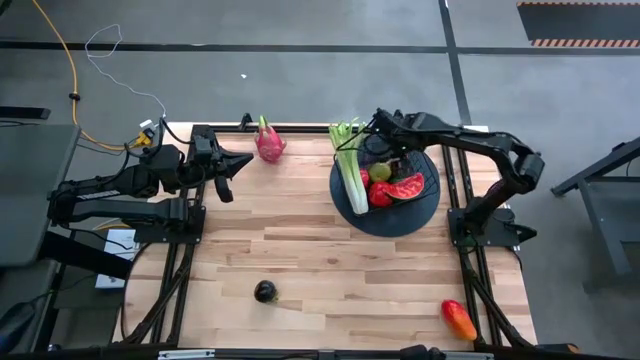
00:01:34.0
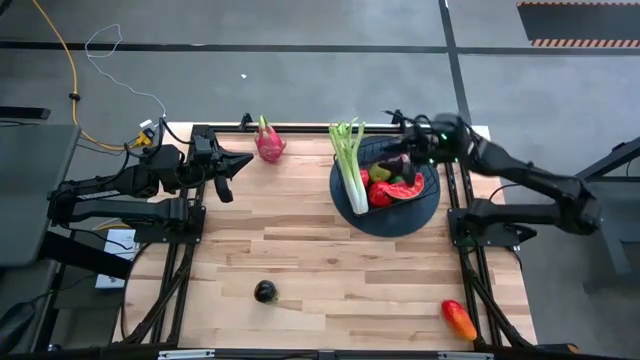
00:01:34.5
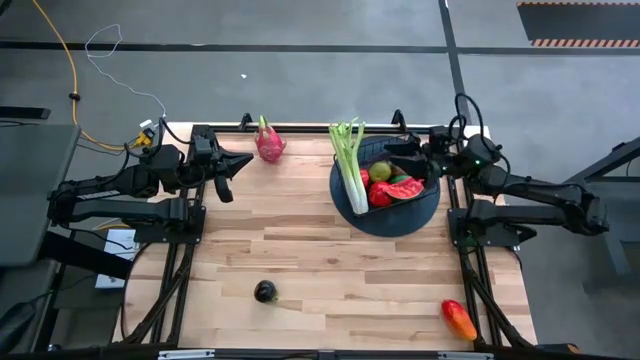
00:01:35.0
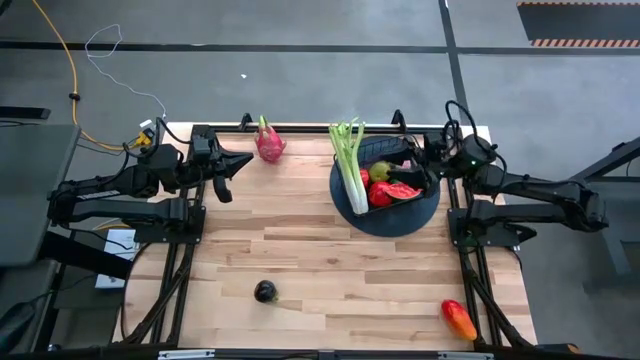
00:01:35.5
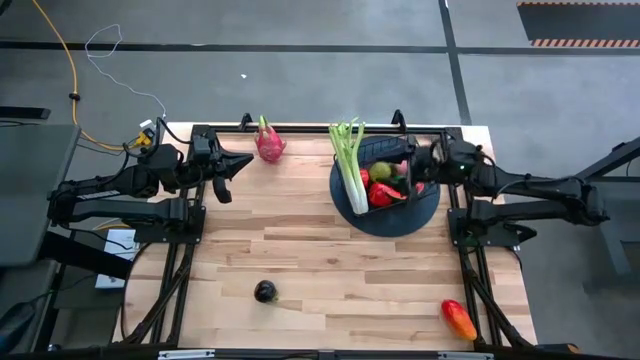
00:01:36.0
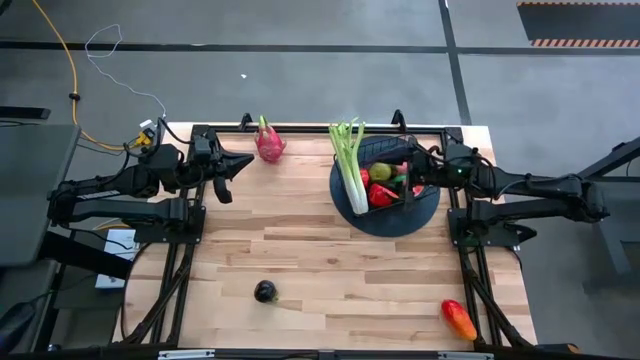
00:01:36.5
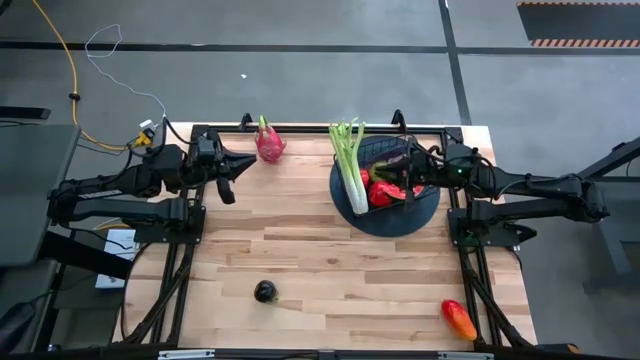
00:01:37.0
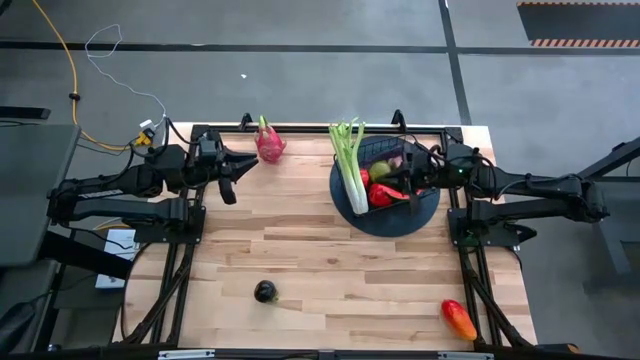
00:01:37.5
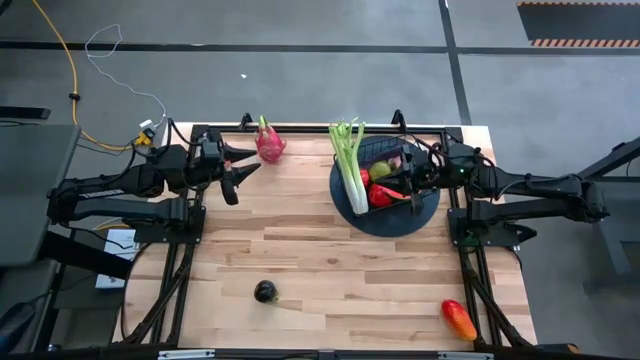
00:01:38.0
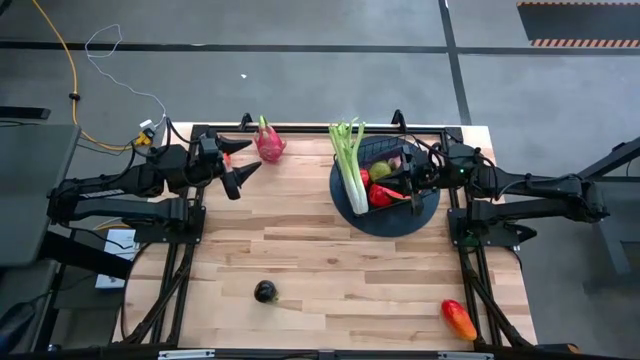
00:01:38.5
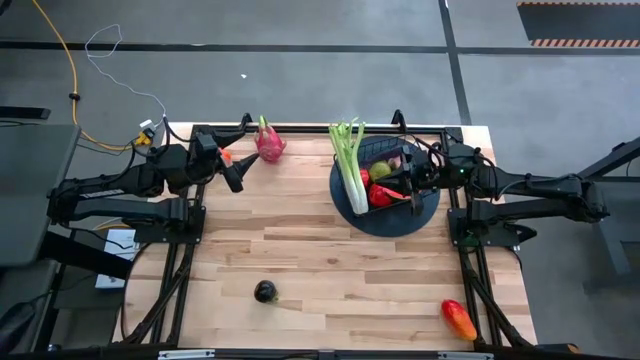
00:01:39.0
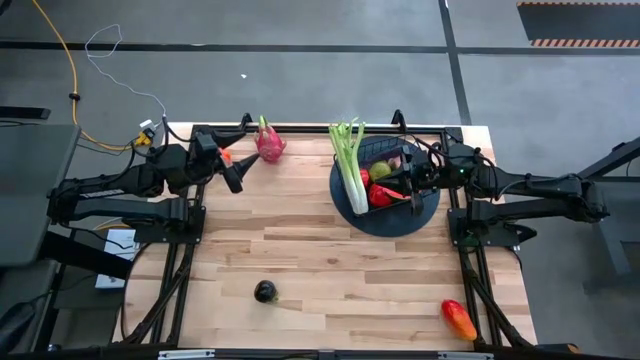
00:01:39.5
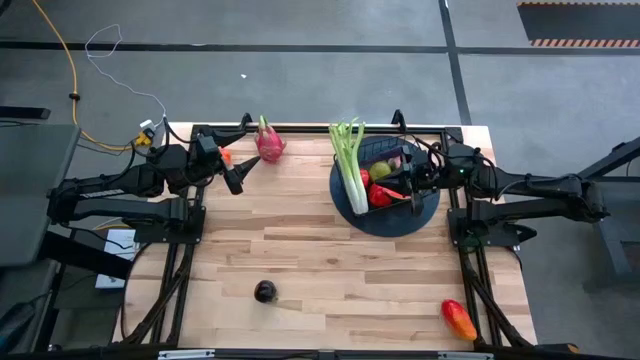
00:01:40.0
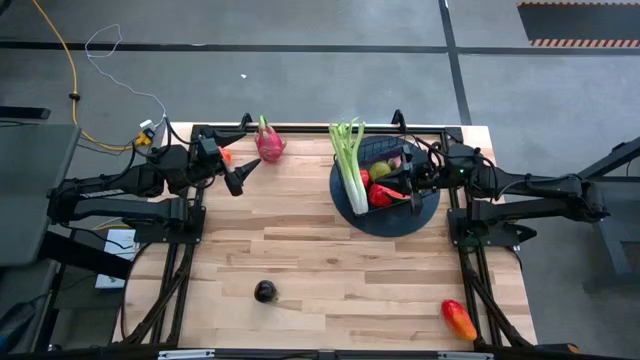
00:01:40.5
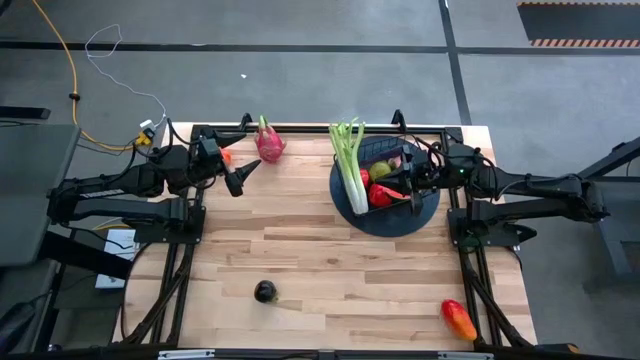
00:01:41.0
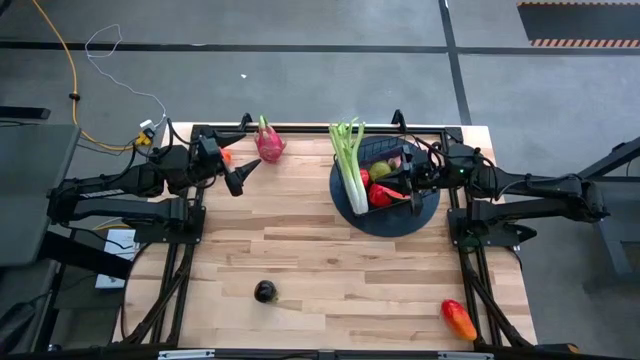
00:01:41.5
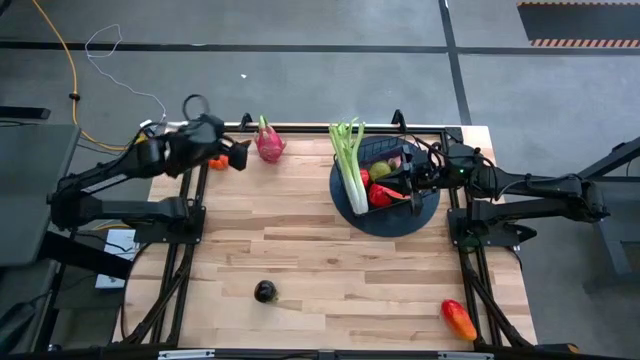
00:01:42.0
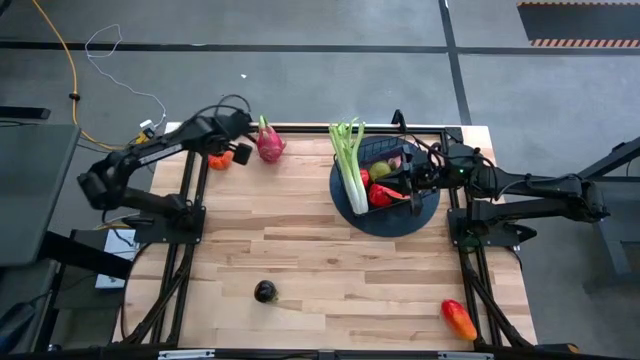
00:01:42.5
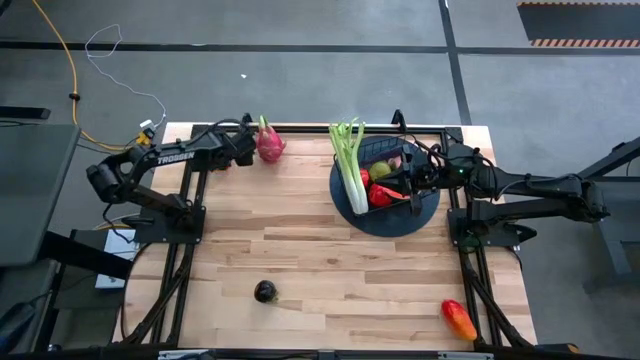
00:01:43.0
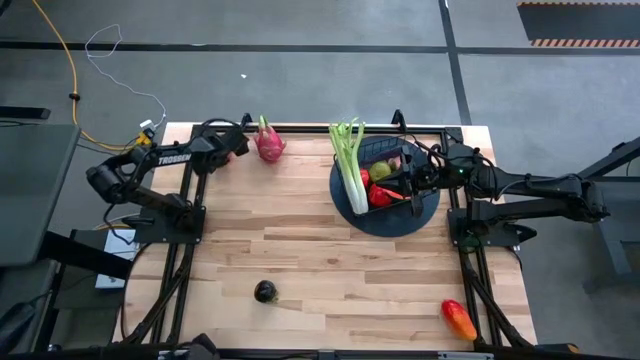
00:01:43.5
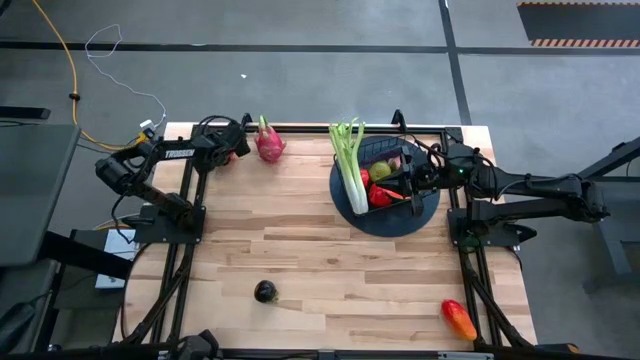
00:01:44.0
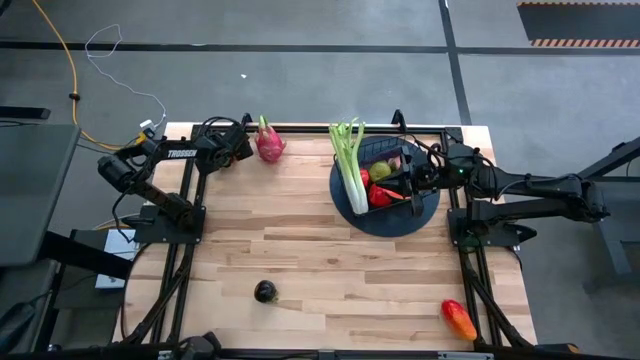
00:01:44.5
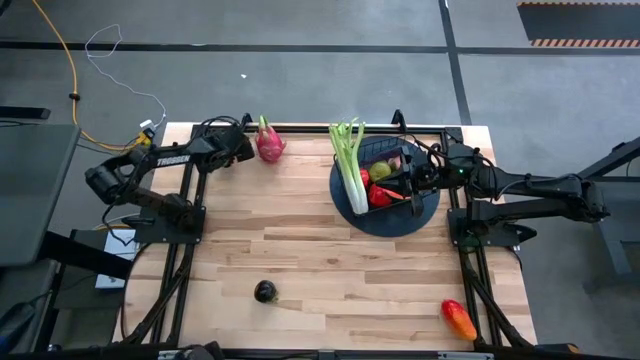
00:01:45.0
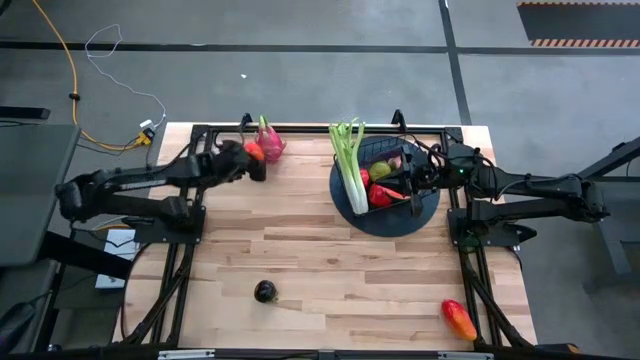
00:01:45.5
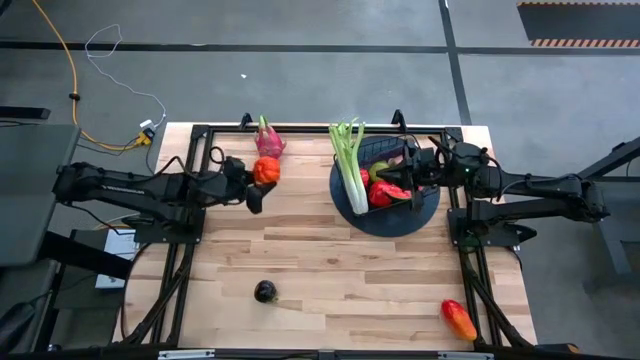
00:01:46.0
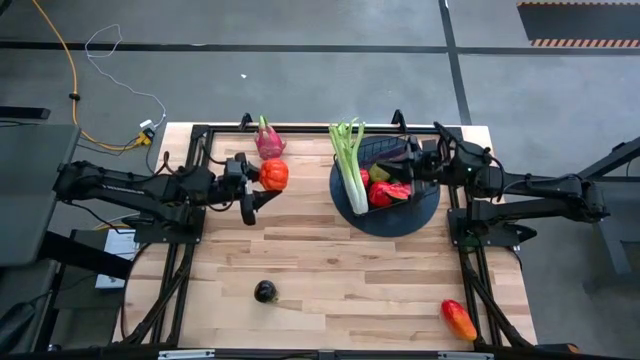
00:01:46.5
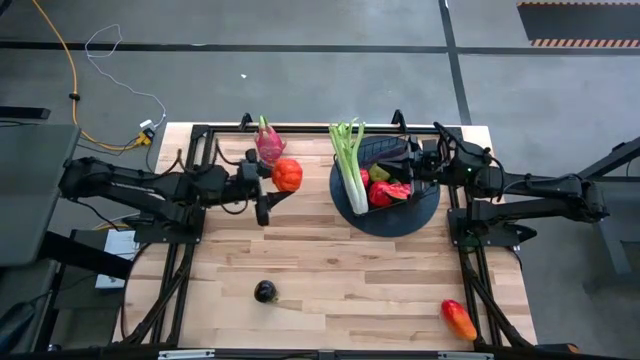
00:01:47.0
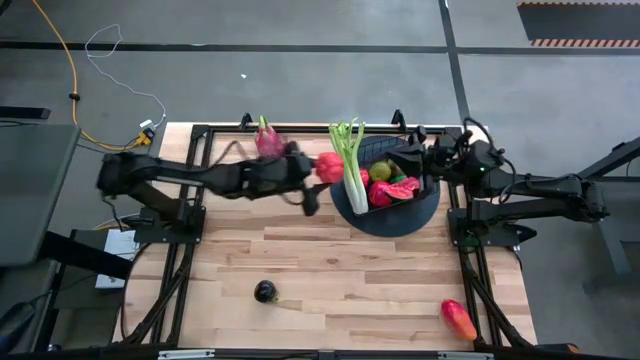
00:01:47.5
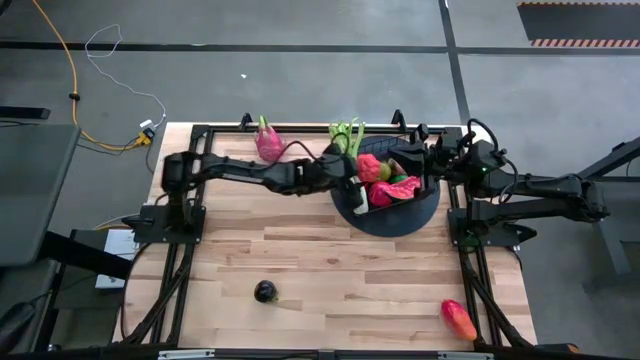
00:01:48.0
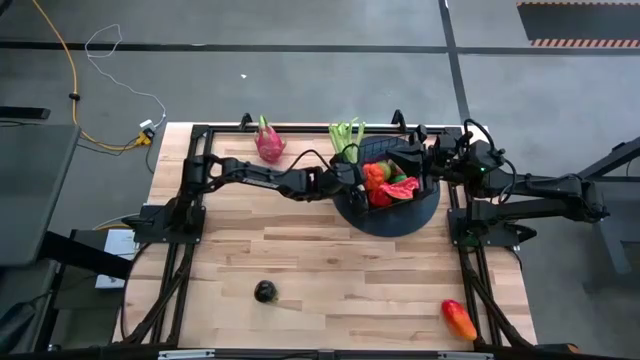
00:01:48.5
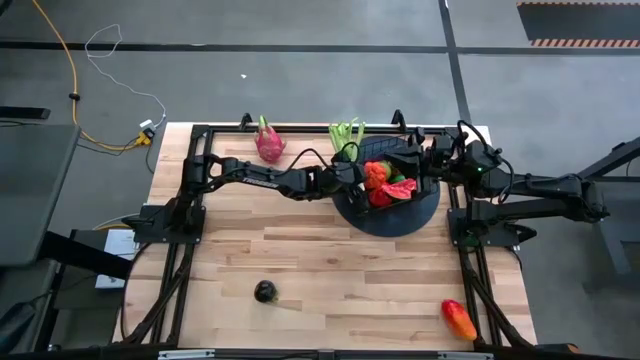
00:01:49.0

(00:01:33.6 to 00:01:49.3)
Task: Build produce basket
Put the pumpkin into the wire basket

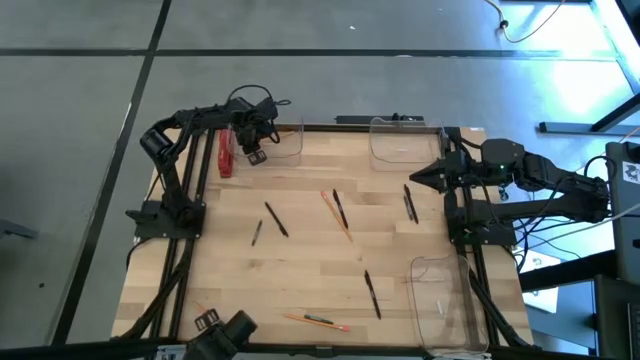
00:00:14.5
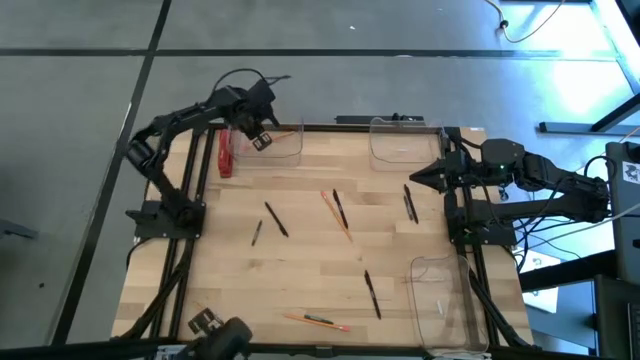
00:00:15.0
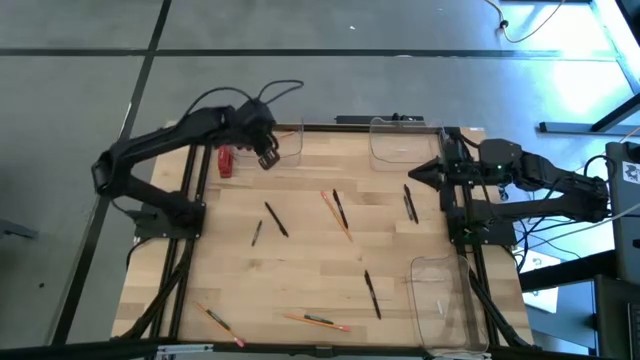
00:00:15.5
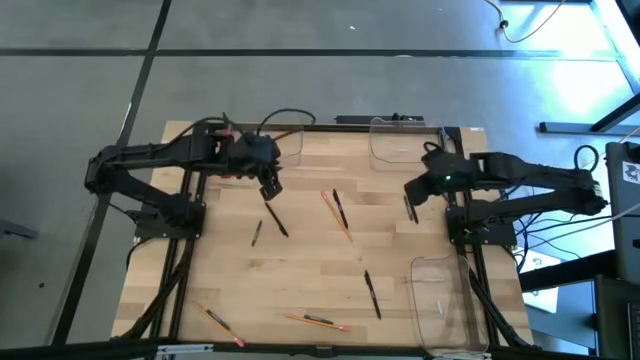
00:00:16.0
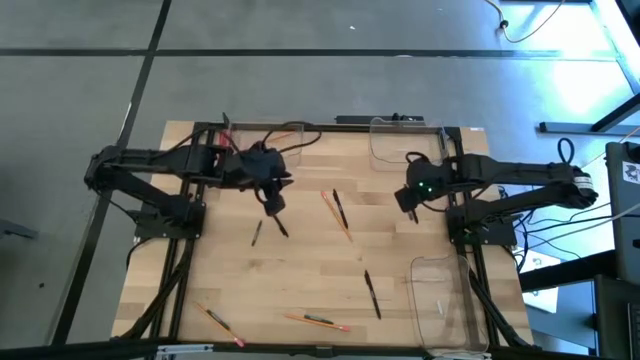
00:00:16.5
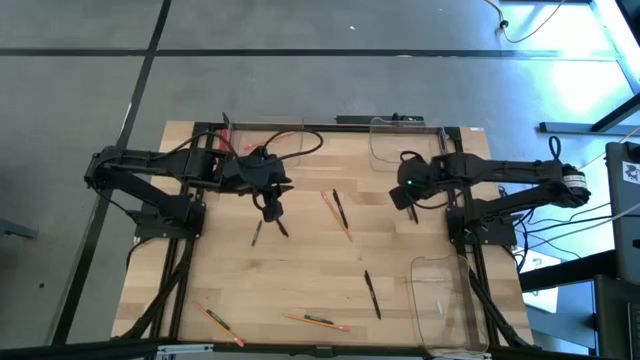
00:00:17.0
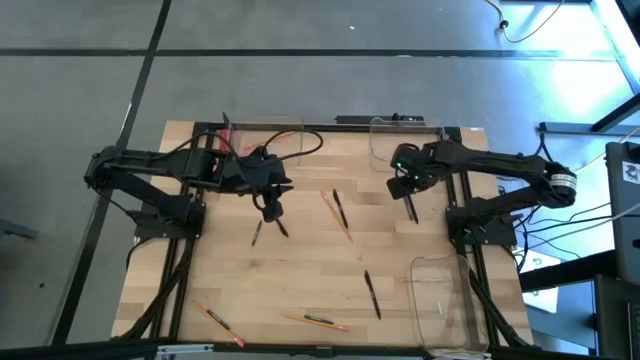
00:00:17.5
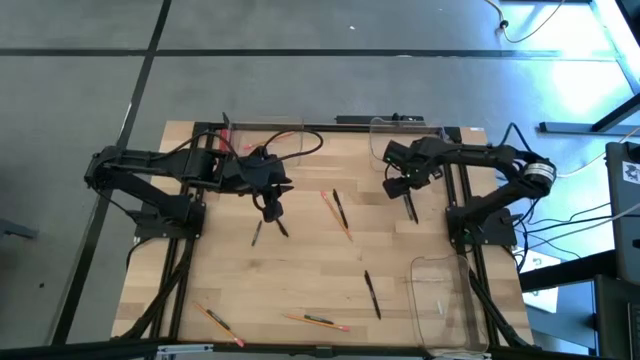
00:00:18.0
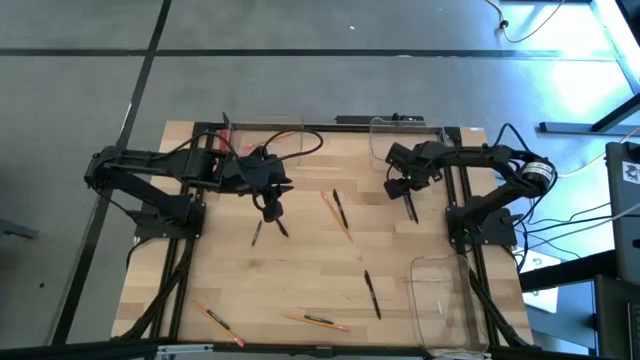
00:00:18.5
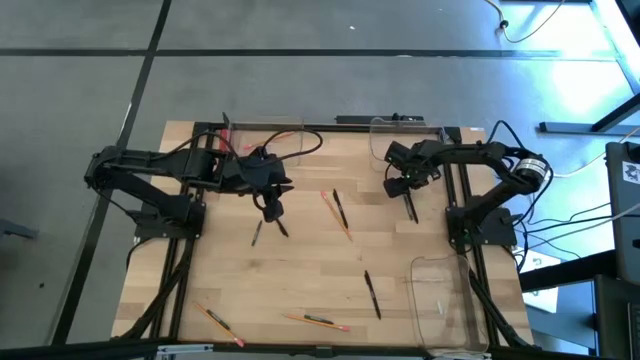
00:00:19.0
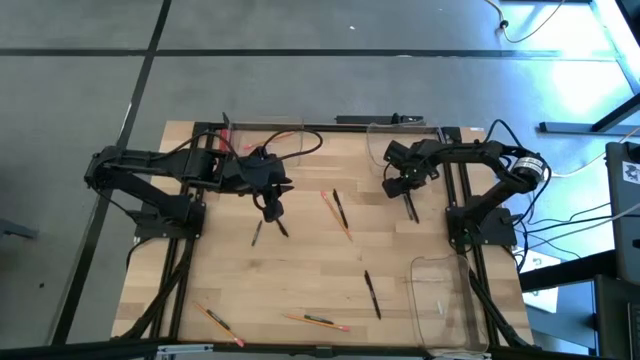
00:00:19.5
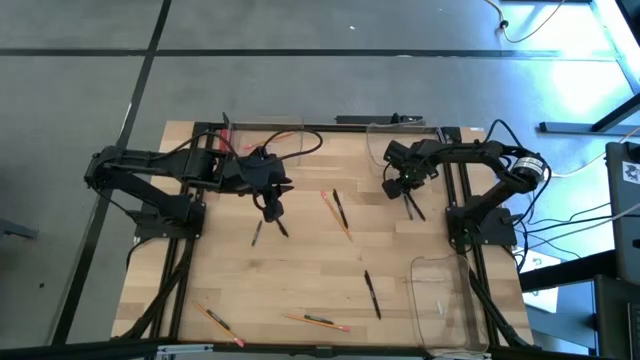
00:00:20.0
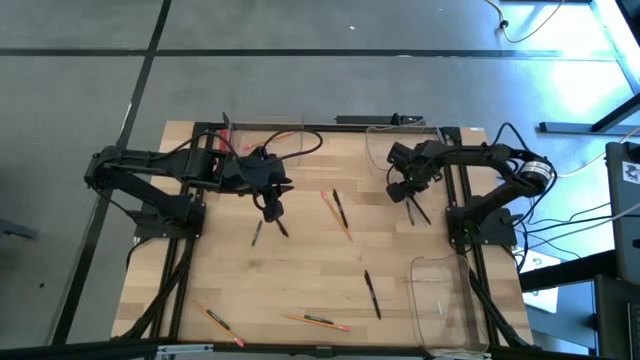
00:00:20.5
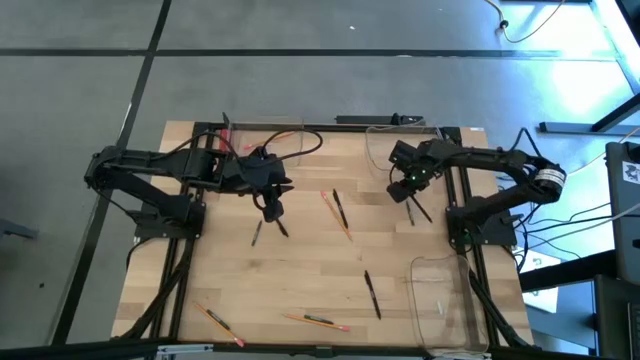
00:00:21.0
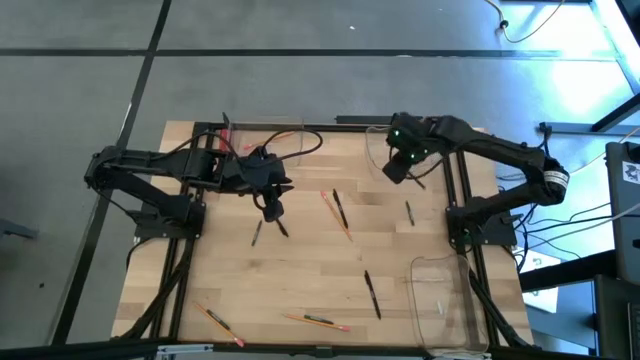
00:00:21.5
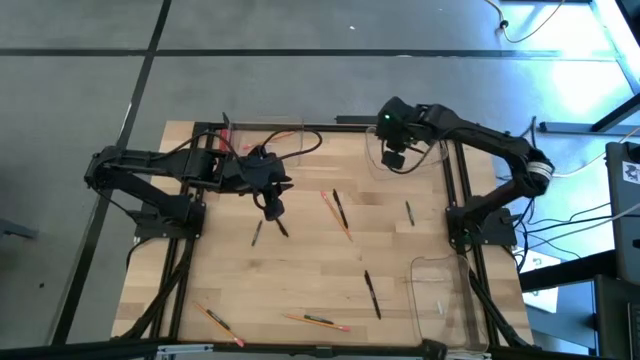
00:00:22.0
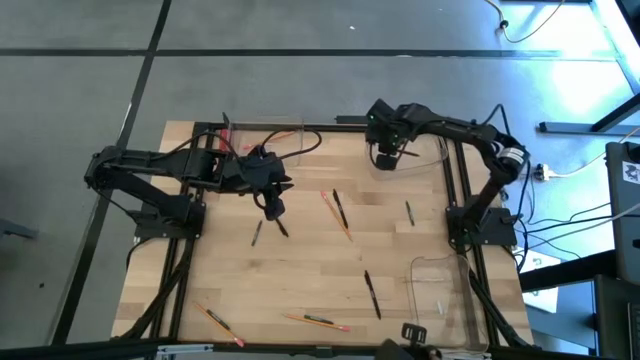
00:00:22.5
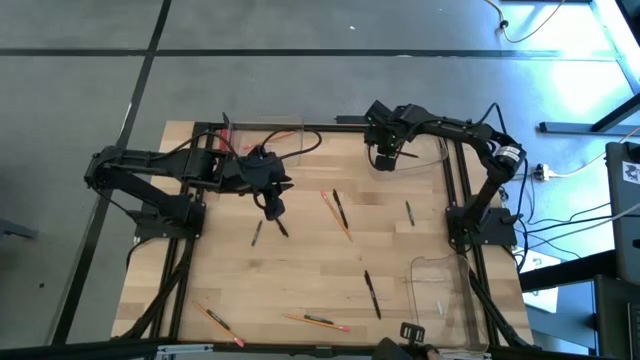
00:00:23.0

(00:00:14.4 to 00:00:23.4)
Task: Sort crayons/erasers/pens/pencils in bins
Put the top right black pen into the top right transparent bin
